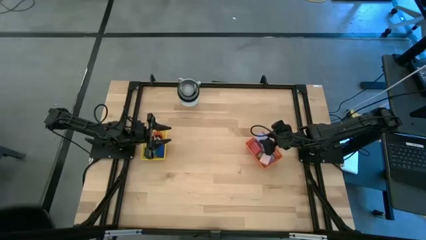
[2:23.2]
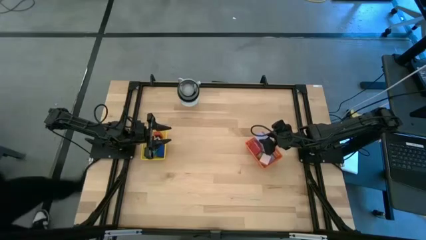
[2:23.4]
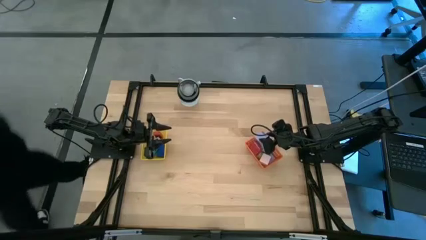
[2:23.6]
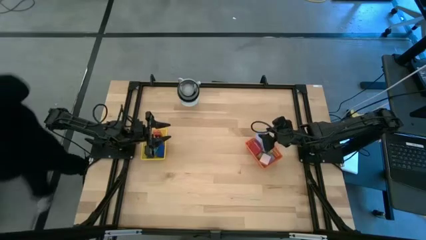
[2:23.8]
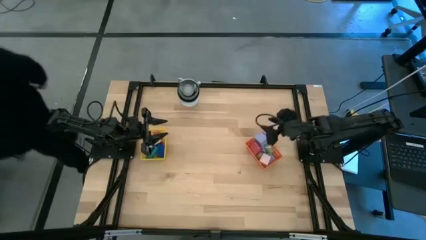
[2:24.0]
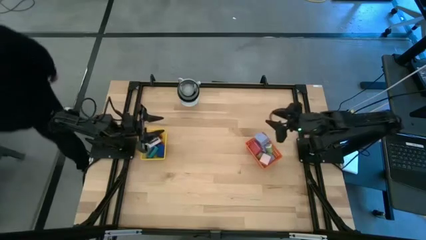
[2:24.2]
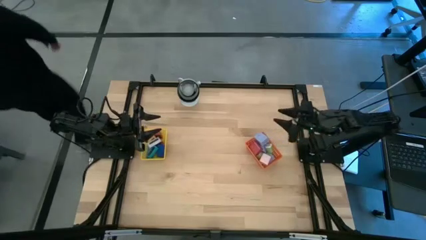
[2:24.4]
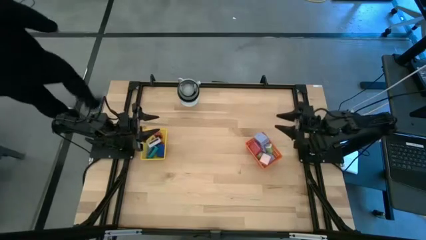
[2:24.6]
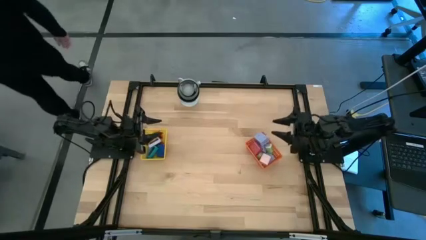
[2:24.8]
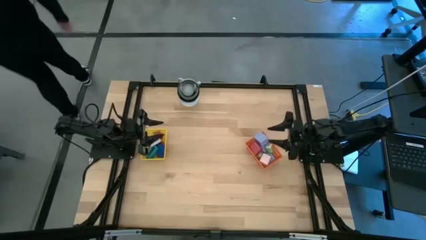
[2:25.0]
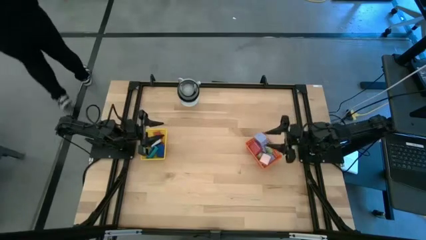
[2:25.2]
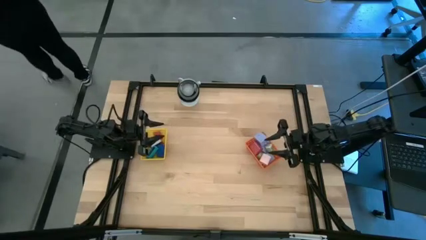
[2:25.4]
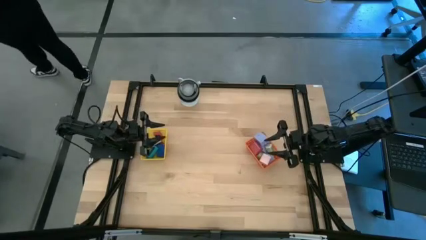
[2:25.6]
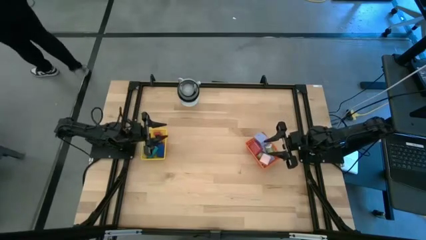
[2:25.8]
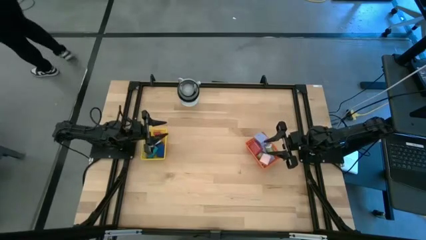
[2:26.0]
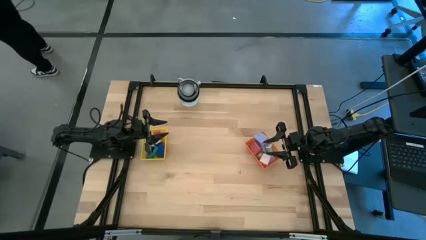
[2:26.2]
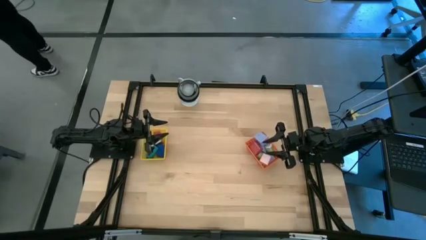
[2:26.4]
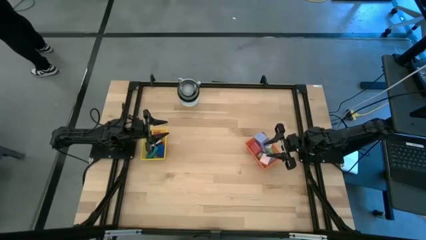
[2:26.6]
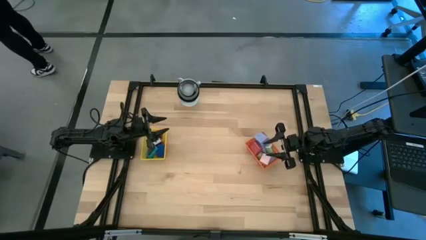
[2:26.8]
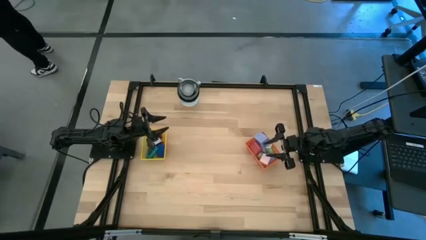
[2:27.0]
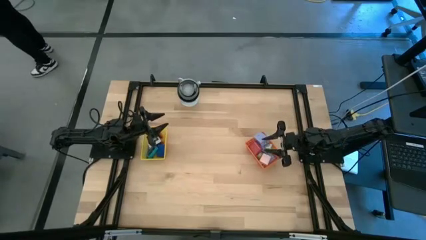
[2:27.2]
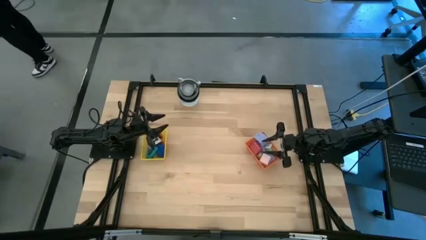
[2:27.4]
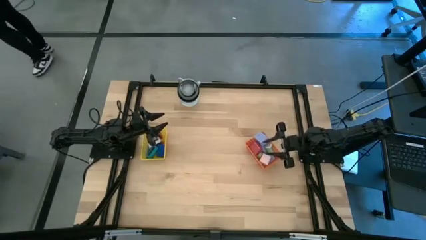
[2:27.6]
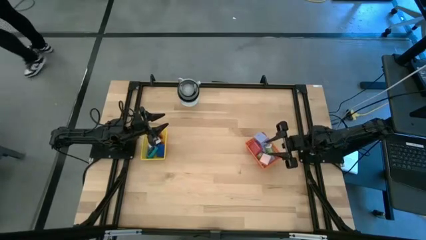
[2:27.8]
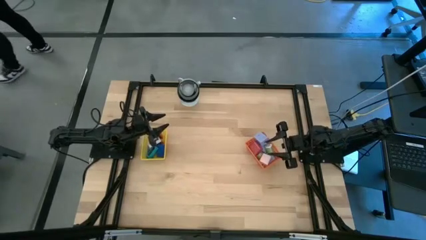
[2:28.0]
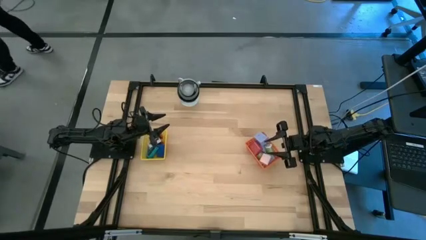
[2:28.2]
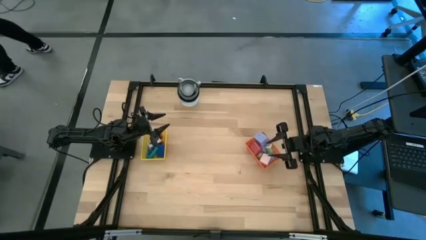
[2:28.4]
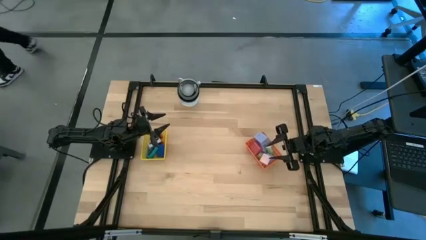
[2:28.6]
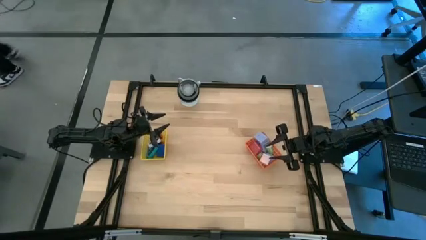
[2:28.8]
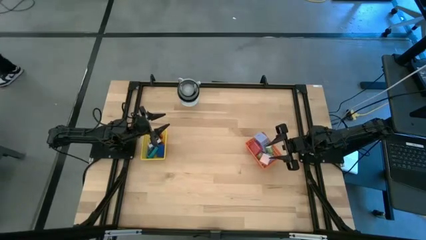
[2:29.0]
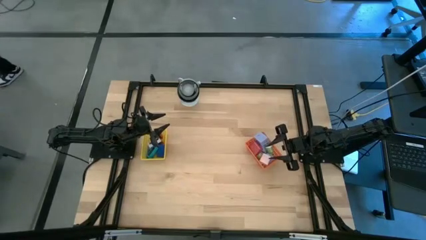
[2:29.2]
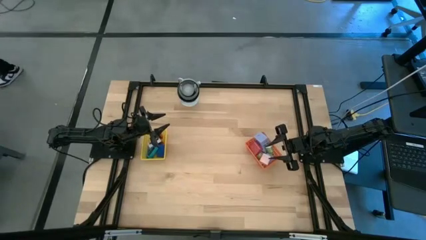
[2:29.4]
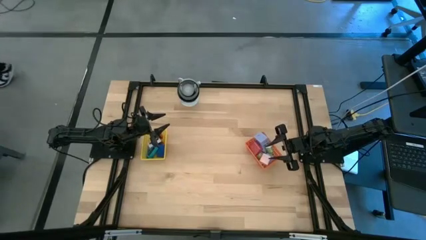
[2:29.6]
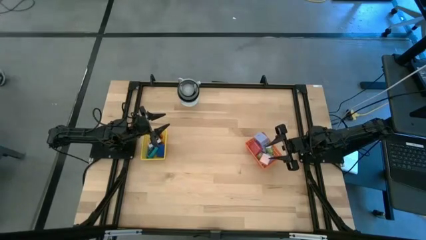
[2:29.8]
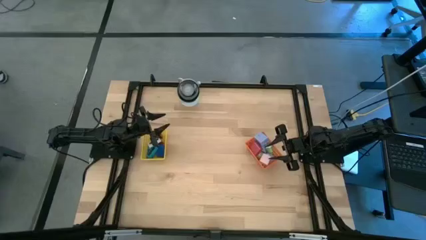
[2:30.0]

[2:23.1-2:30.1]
Task: Pick & Place Office items
Return to Home Position

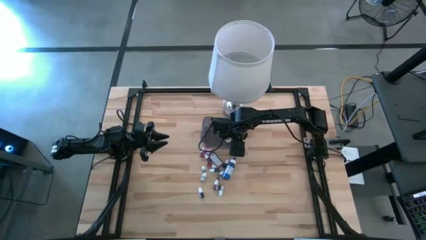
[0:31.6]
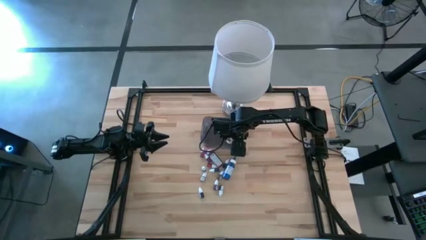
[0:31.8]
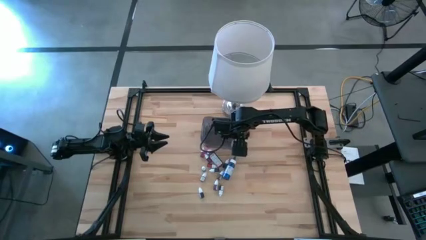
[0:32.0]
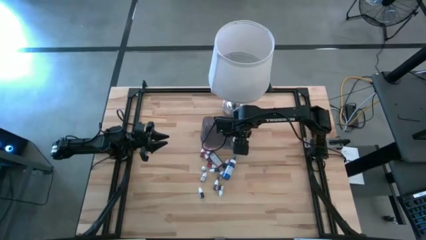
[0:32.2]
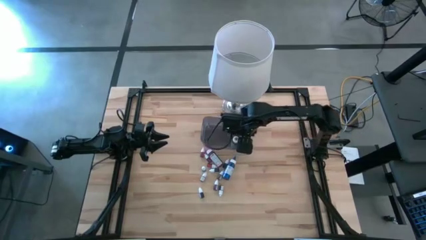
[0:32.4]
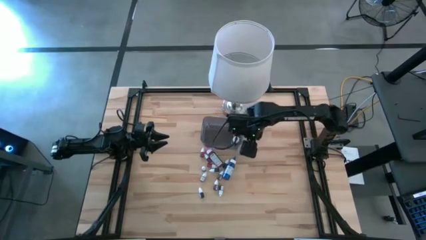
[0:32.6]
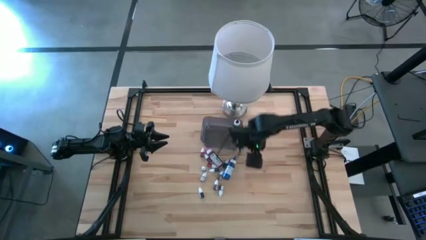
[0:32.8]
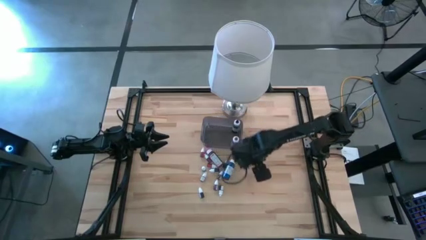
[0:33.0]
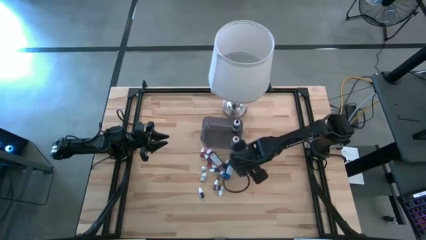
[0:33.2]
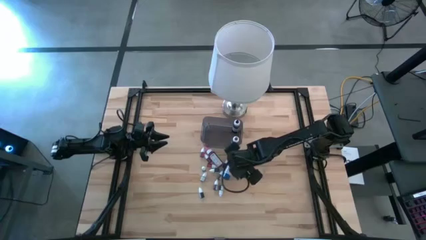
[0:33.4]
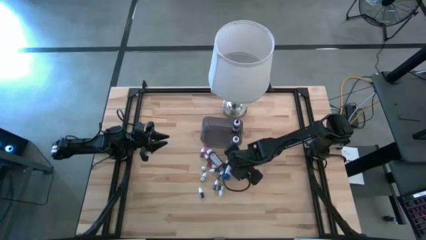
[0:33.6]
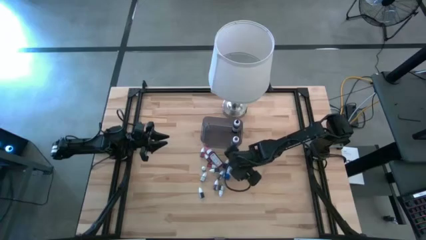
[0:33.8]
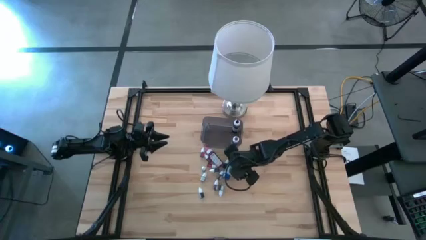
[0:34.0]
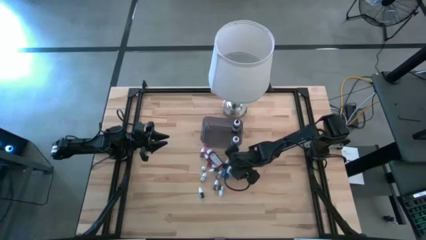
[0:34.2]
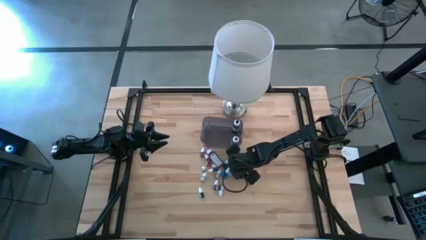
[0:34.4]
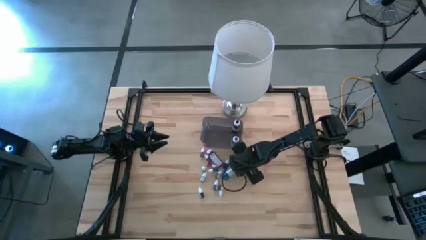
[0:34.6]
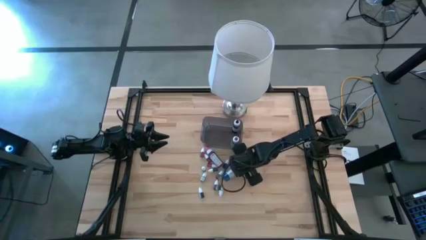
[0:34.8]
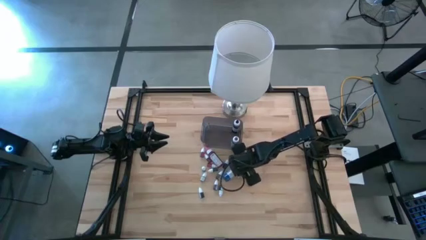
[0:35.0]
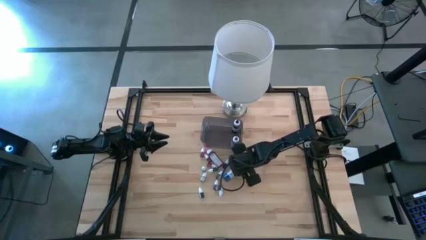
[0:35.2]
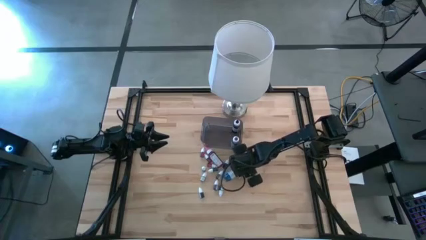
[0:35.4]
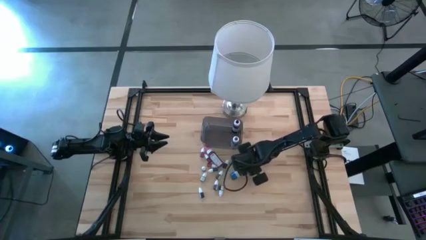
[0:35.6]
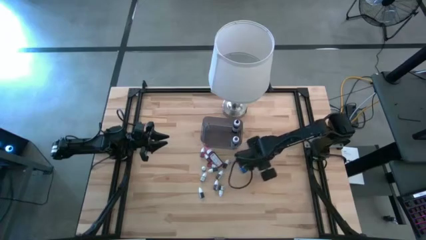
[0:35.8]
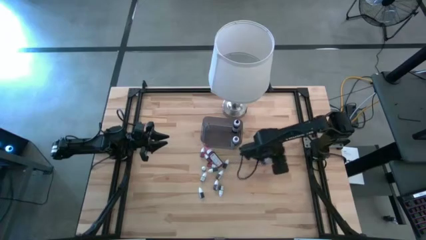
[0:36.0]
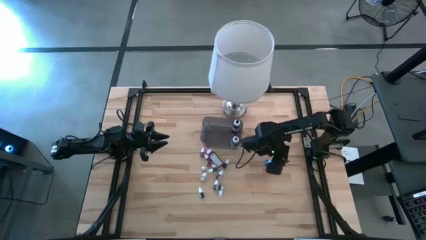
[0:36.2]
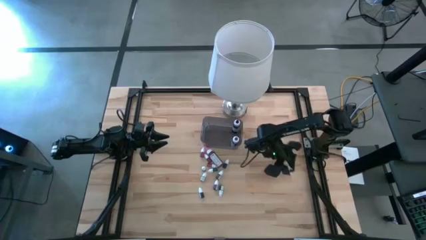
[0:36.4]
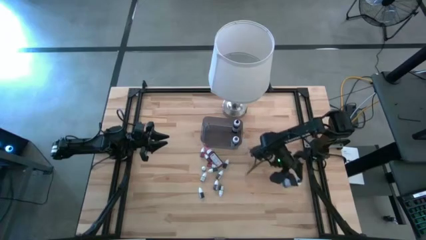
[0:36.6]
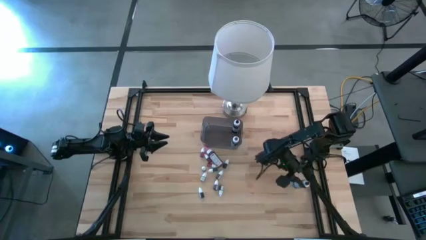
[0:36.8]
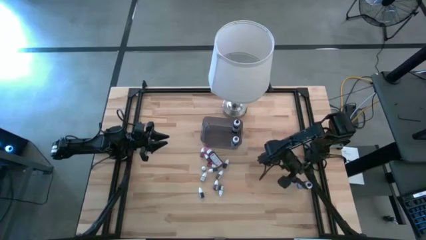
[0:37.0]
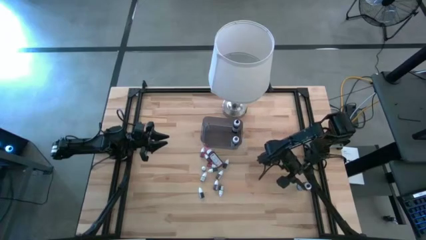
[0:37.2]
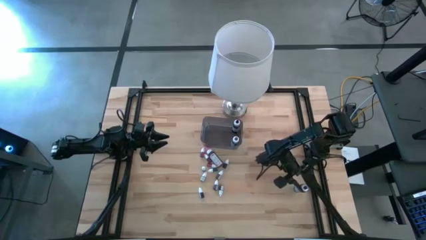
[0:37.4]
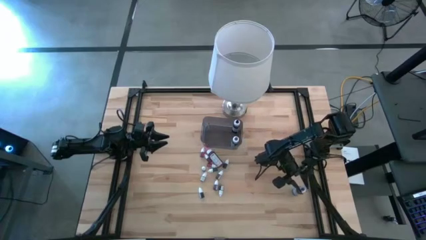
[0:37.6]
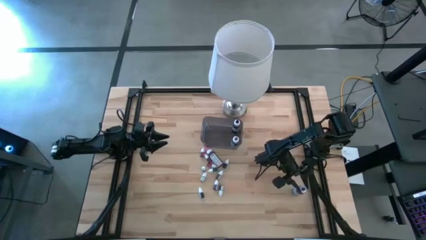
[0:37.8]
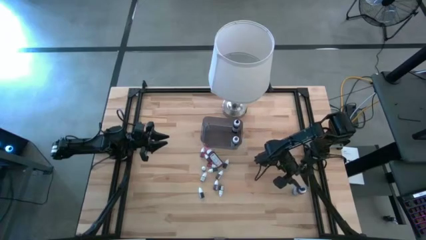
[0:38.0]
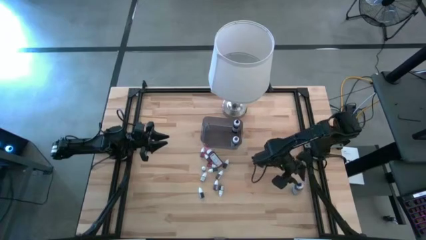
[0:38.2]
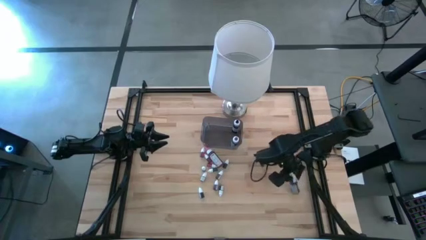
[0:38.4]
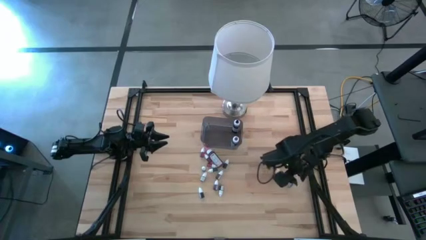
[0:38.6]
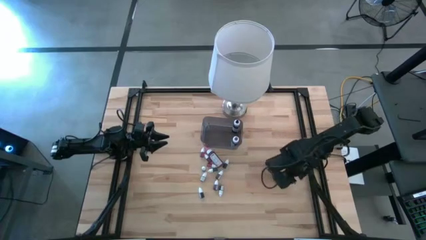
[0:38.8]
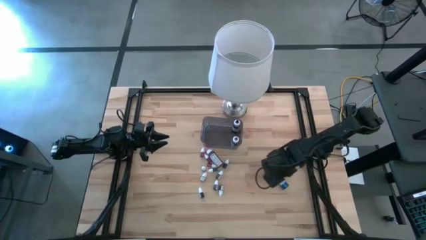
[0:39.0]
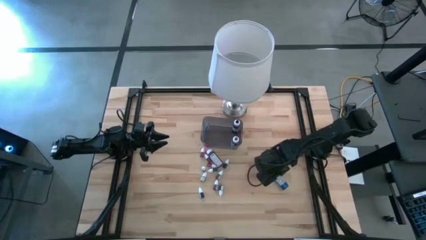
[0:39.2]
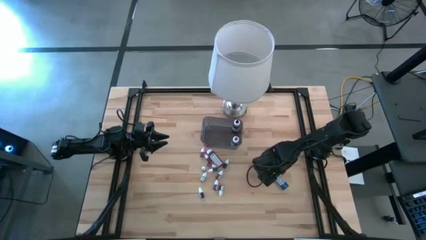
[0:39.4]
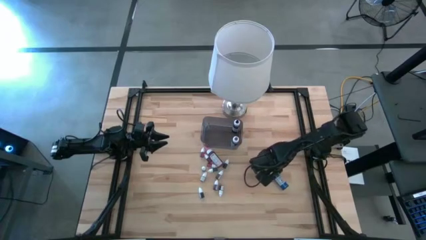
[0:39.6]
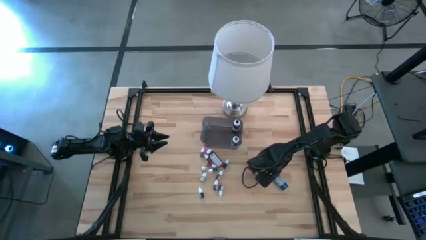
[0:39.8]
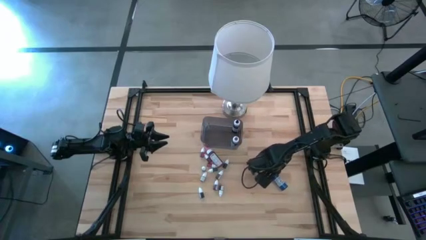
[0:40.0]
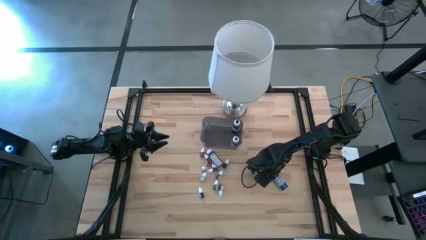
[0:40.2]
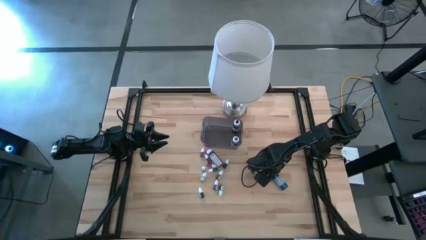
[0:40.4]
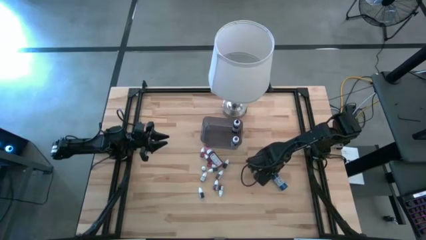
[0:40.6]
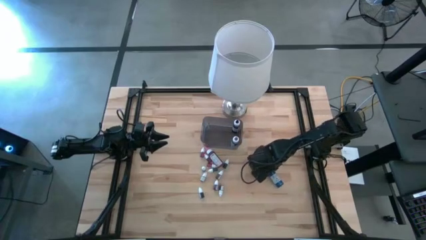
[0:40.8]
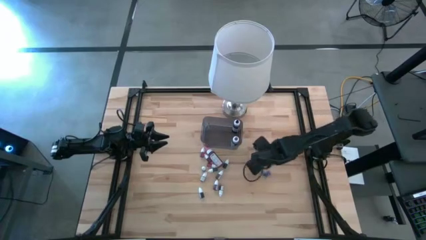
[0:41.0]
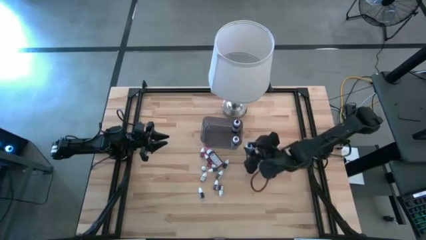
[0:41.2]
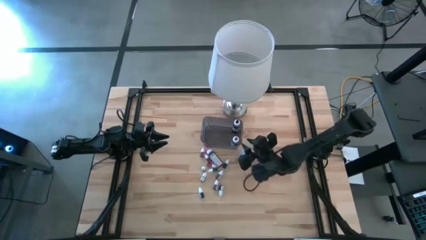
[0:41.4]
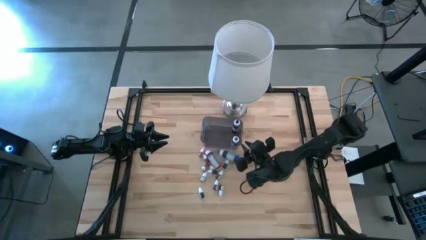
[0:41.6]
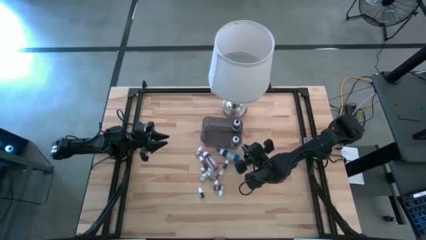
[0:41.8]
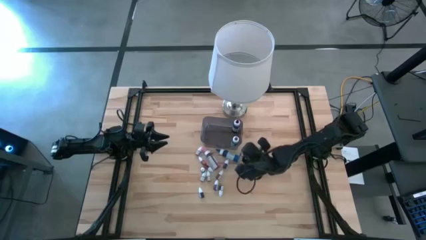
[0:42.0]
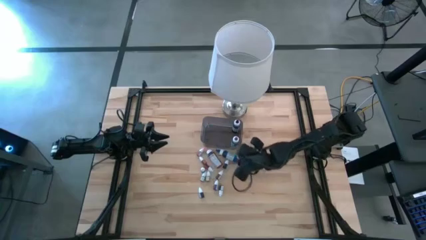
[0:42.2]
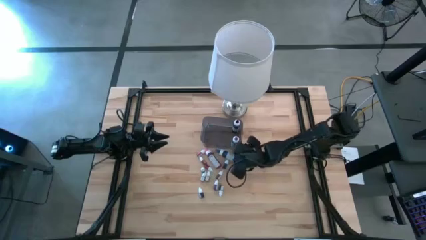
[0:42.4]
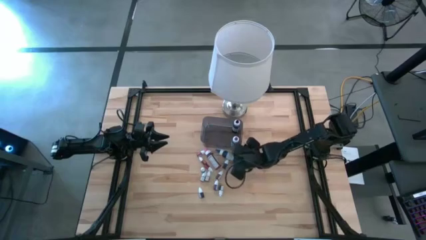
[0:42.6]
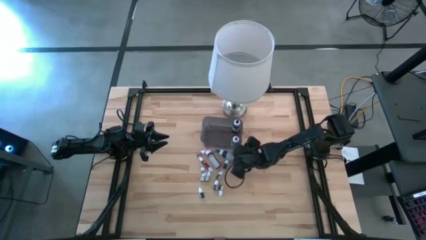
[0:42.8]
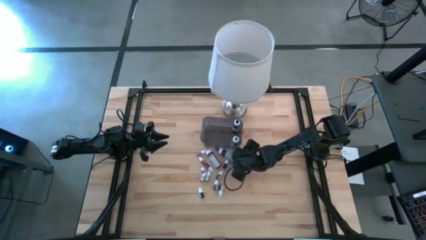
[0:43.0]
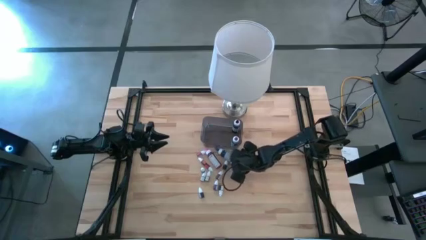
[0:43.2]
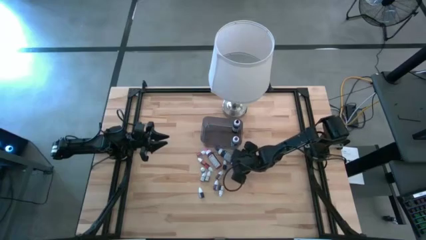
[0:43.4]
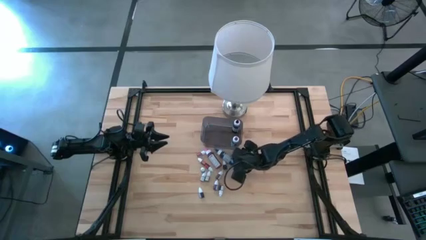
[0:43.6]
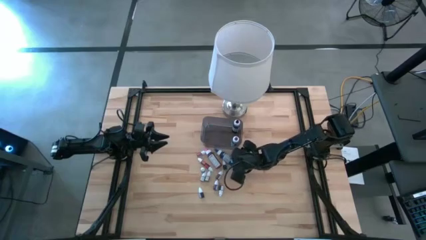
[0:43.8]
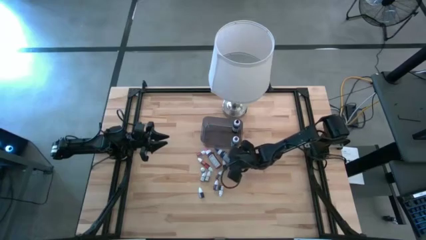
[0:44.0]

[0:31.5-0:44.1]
Task: Pick & Place food coloring
Put the big blue food coloring bottle into the black bin
